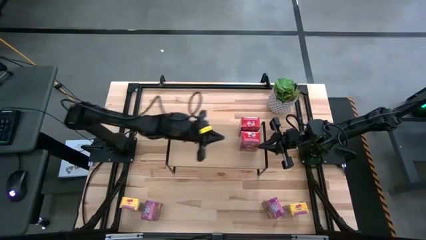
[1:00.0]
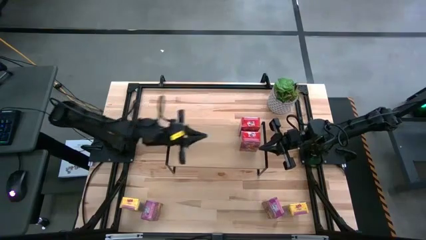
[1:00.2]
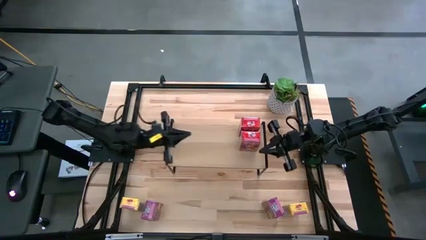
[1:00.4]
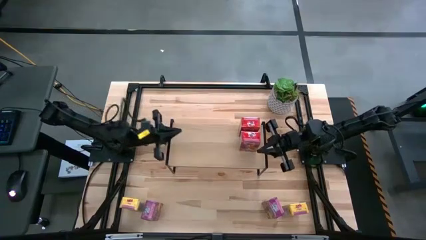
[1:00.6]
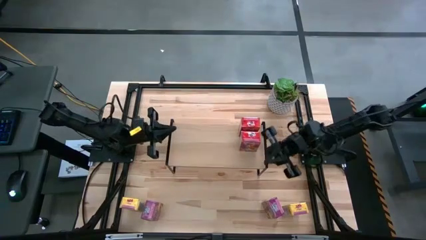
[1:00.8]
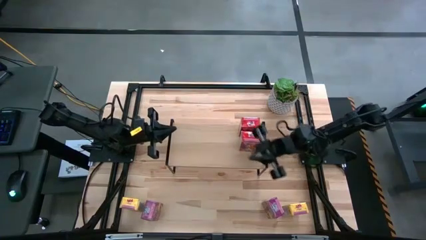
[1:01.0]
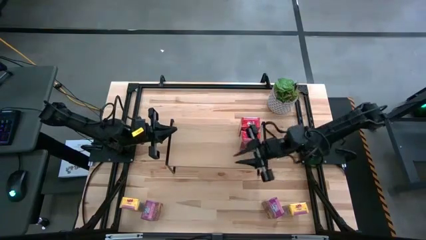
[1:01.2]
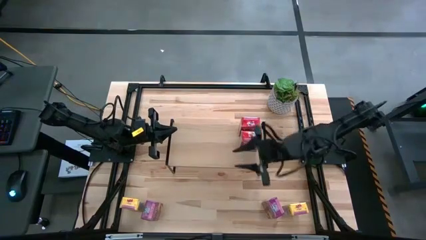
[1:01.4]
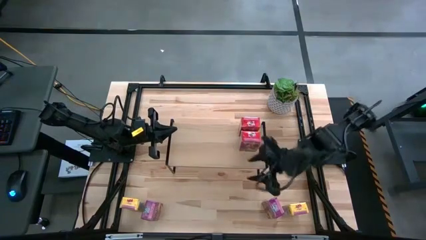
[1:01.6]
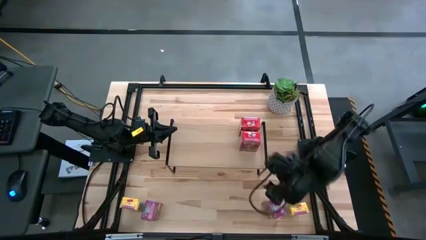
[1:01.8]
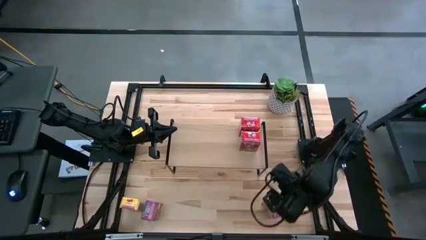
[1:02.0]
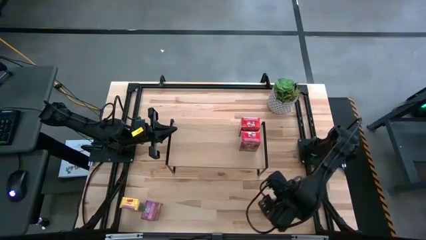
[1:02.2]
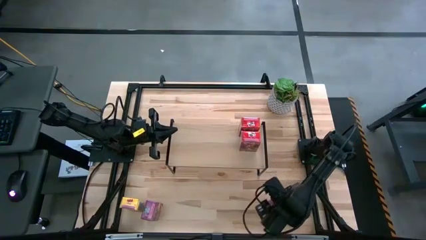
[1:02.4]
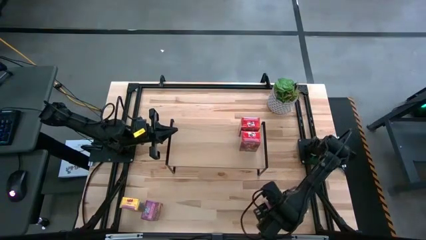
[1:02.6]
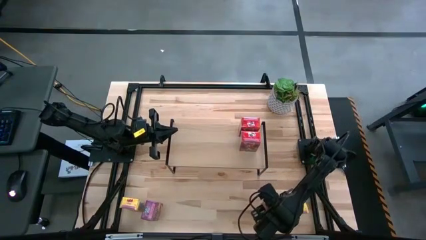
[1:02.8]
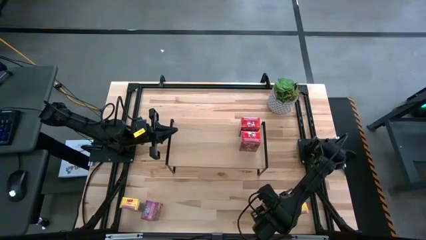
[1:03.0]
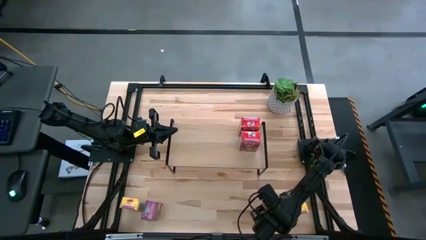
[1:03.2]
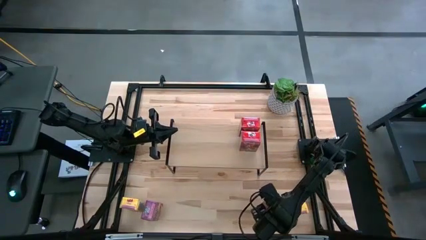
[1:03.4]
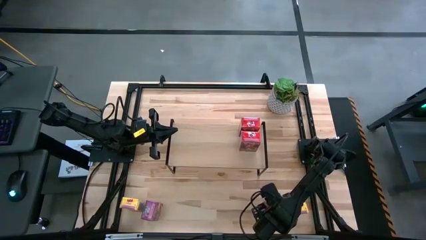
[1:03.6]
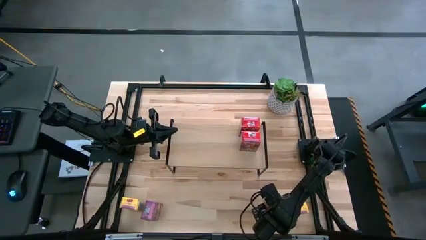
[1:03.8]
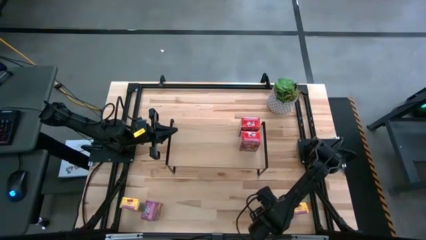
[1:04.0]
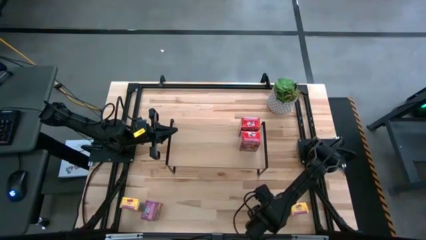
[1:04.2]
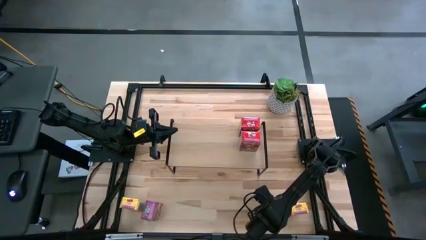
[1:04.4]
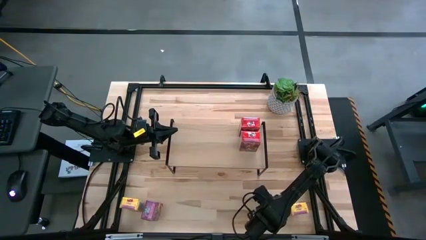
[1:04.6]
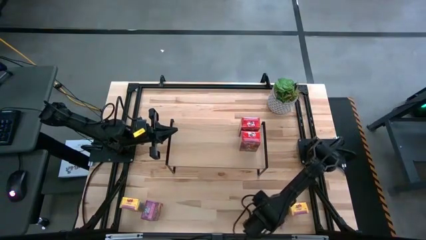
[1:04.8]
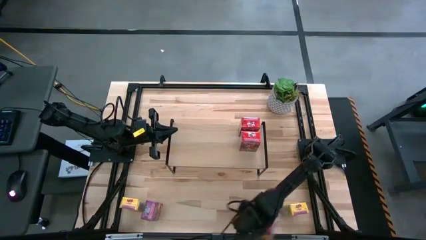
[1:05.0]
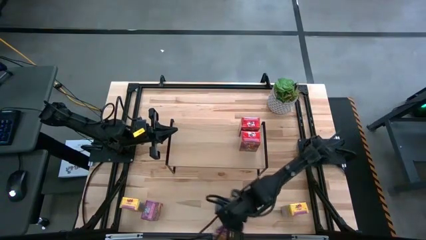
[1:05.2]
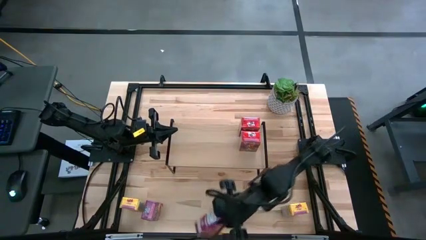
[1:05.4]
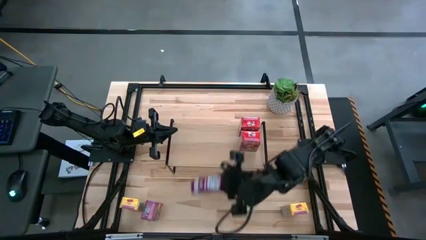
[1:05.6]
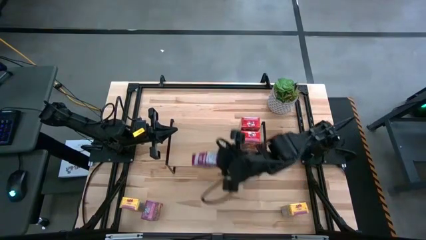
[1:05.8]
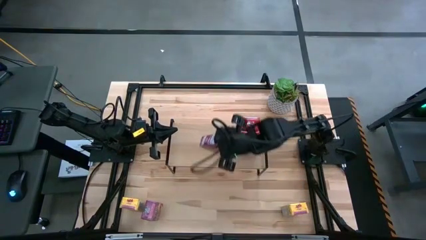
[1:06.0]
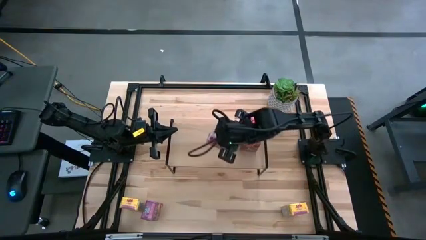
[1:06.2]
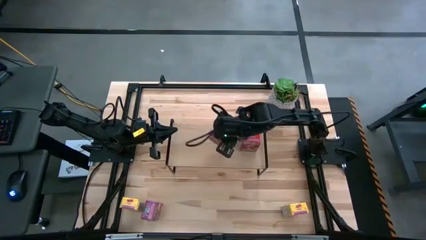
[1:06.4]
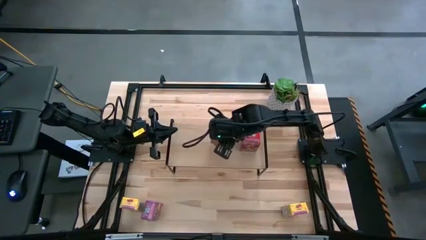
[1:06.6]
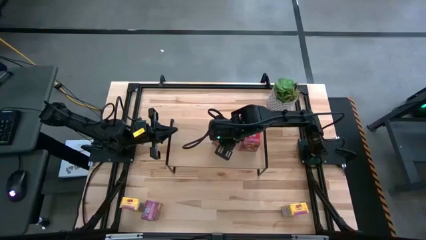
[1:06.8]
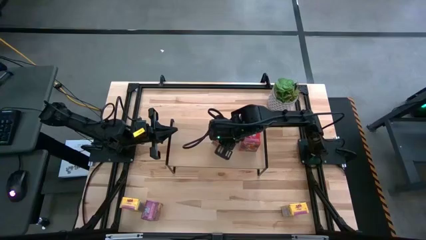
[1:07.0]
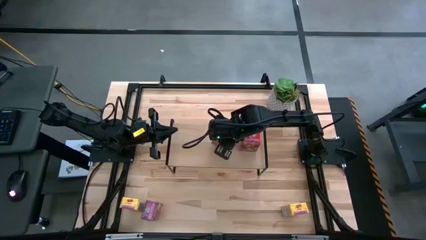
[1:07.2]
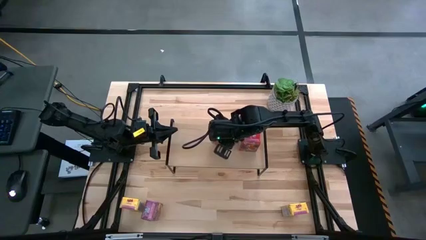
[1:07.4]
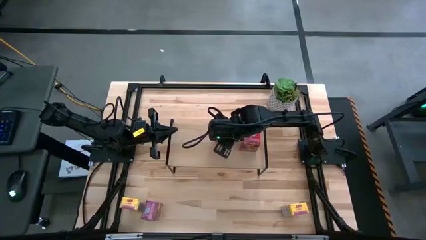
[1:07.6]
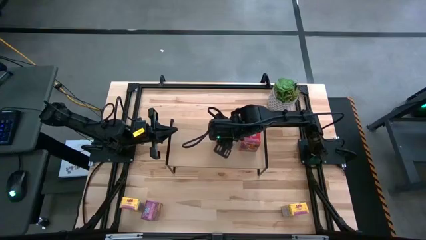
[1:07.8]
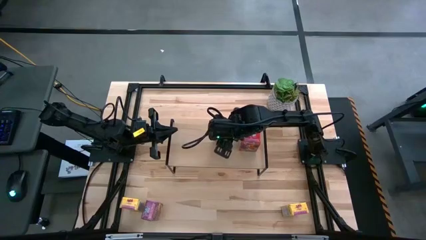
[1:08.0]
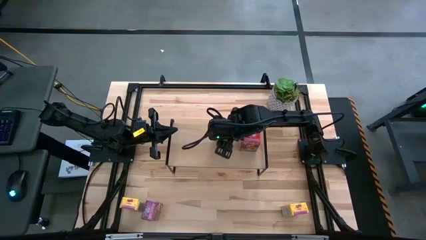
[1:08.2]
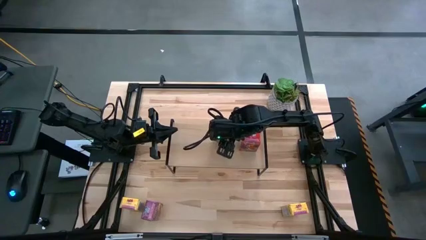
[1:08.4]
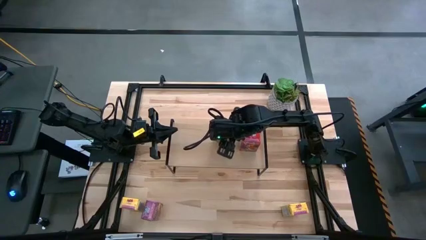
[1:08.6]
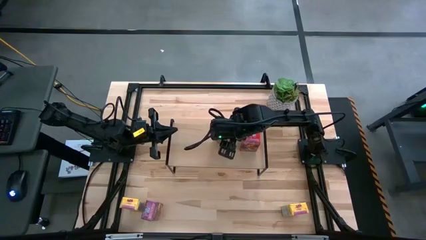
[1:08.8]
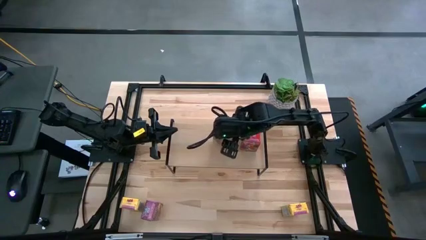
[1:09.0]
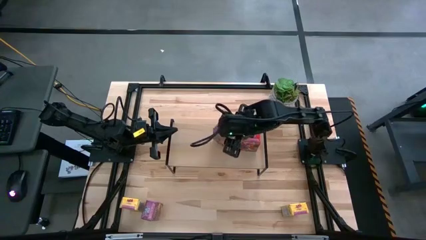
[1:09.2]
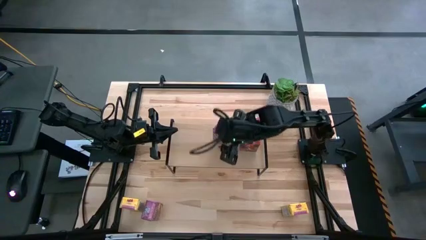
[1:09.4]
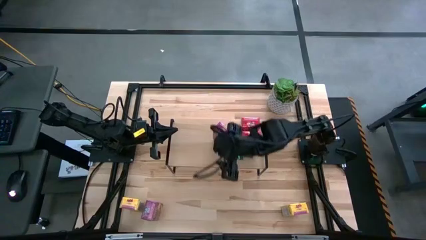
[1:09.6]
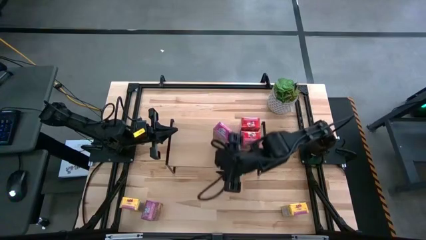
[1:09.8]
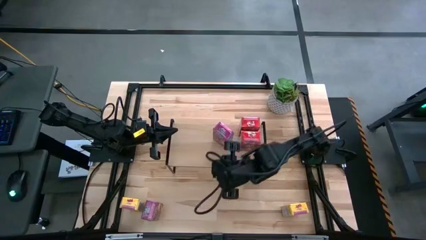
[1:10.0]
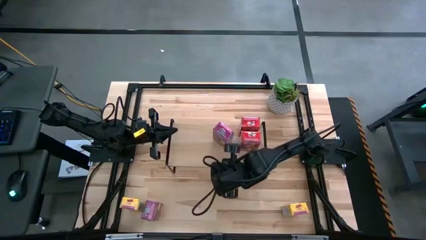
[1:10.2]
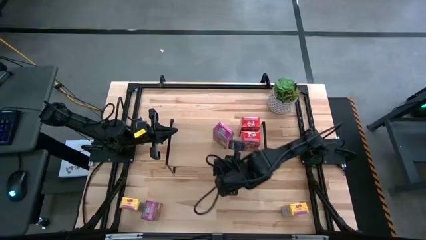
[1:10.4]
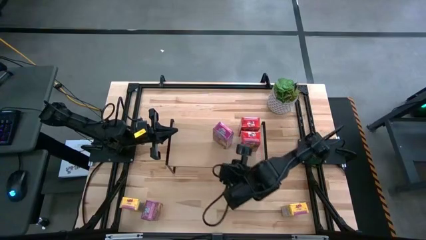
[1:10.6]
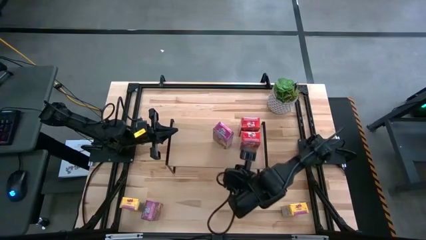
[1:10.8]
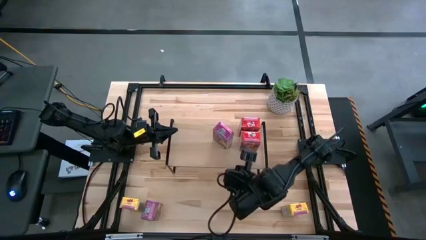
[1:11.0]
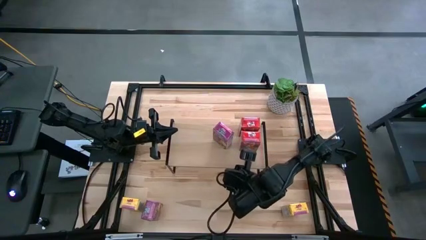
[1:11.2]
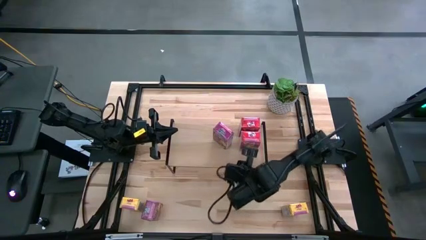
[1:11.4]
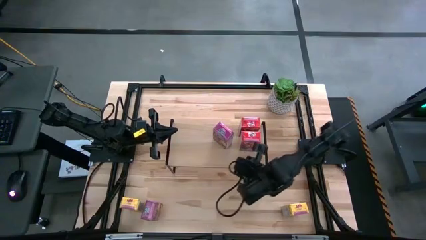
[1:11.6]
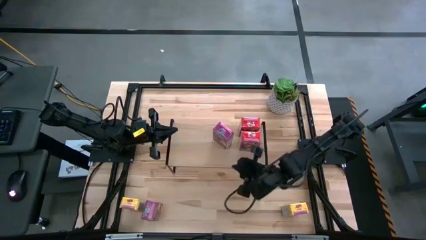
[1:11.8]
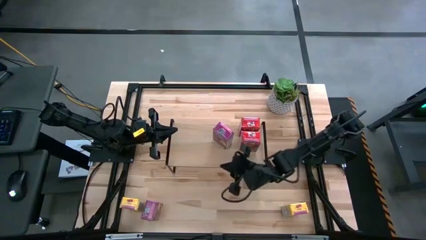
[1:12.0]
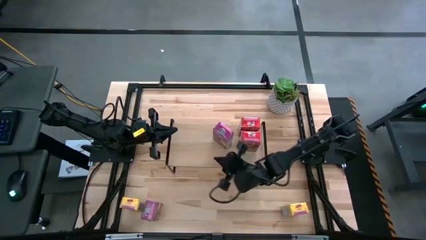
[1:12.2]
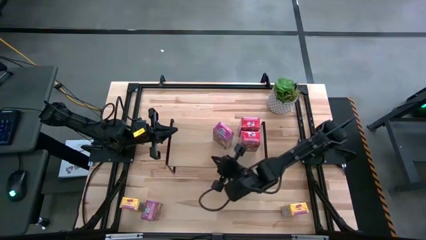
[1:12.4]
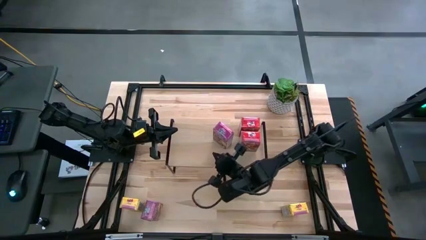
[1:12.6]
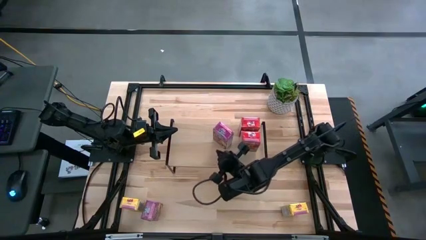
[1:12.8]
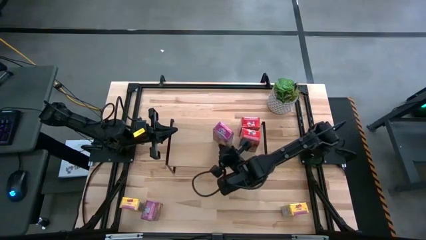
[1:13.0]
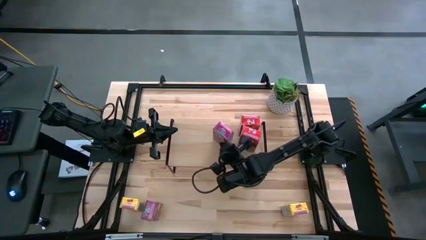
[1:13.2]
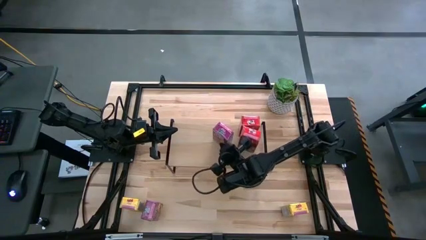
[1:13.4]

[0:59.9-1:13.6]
Task: Stack cereal on shelf
Put the right purple cereal box on the shelf
